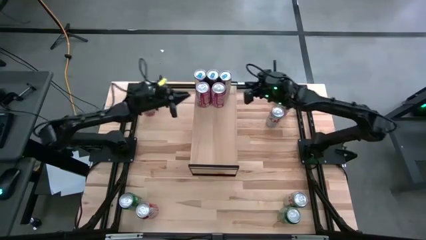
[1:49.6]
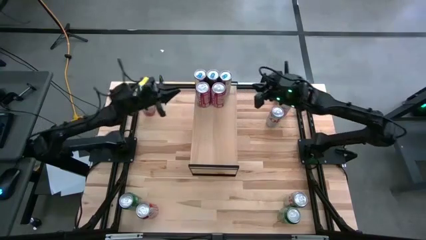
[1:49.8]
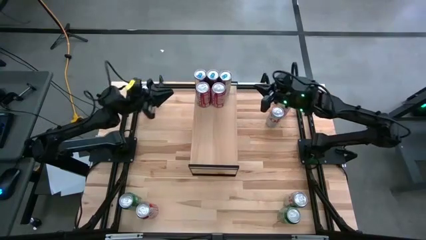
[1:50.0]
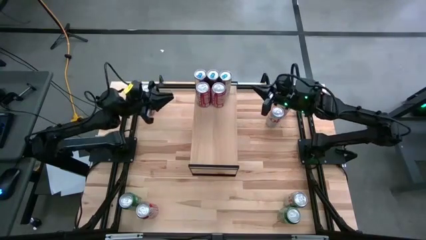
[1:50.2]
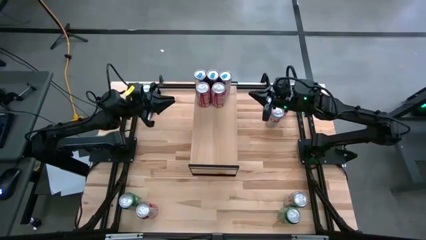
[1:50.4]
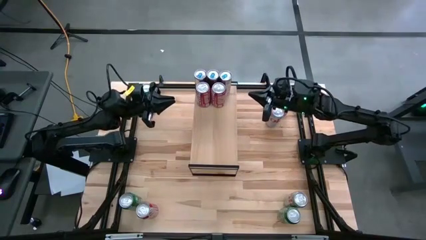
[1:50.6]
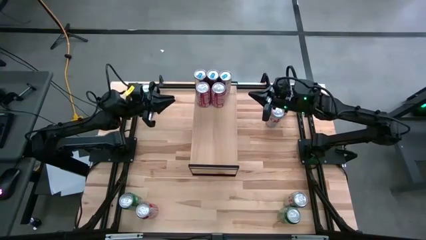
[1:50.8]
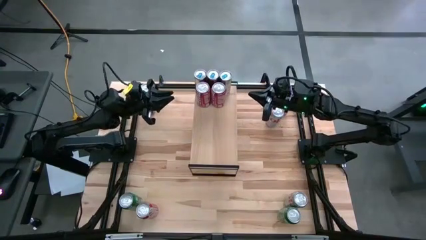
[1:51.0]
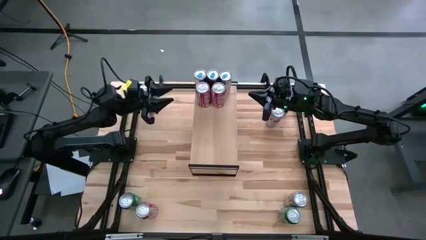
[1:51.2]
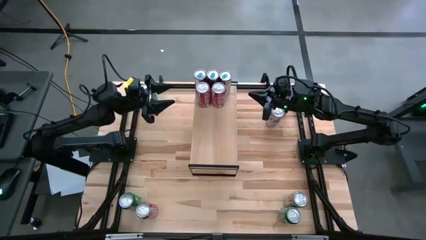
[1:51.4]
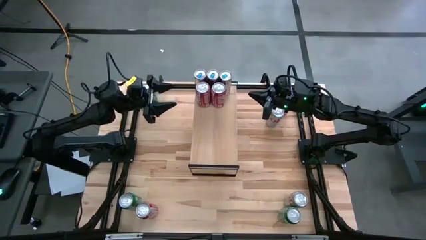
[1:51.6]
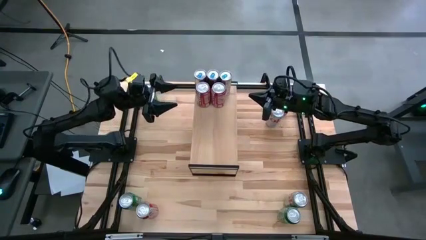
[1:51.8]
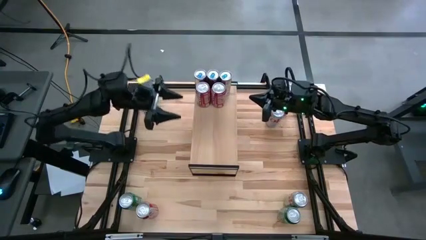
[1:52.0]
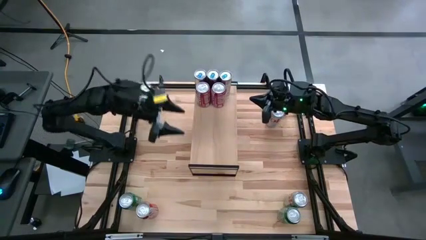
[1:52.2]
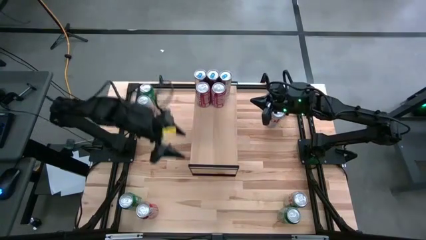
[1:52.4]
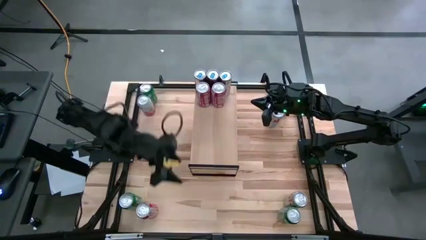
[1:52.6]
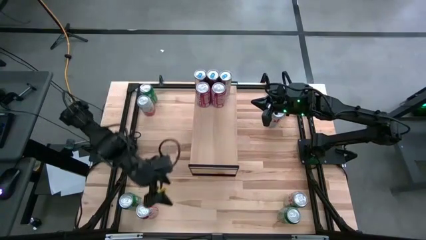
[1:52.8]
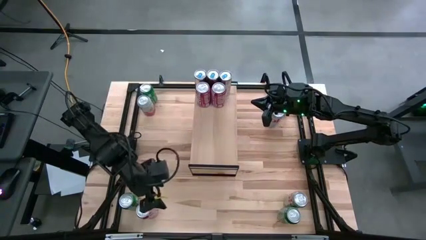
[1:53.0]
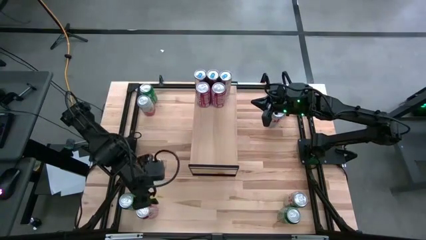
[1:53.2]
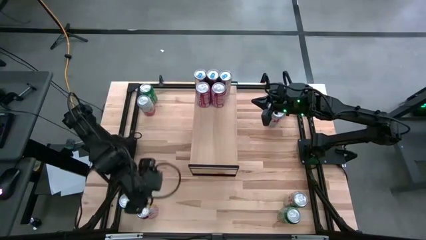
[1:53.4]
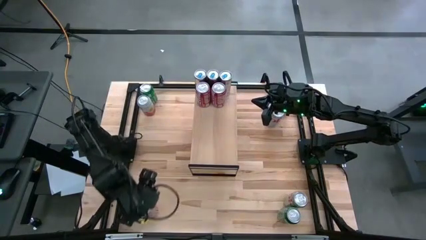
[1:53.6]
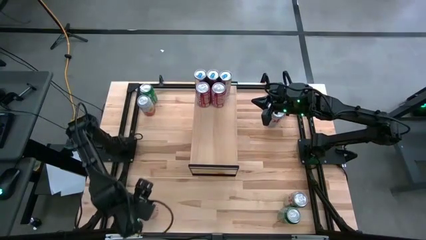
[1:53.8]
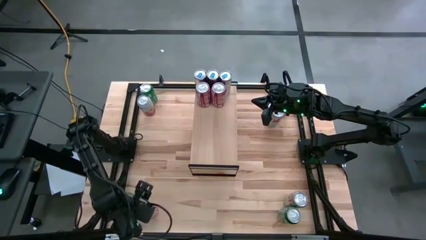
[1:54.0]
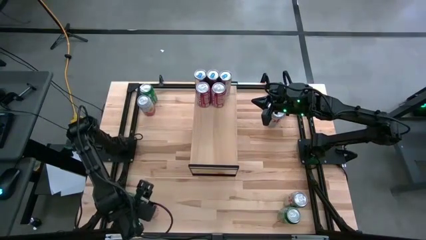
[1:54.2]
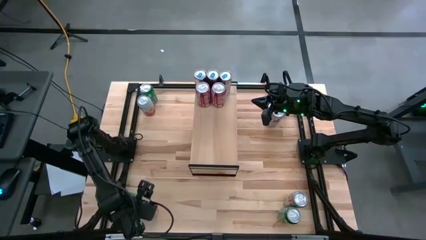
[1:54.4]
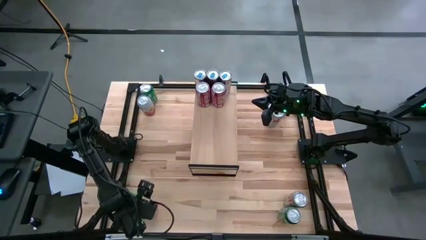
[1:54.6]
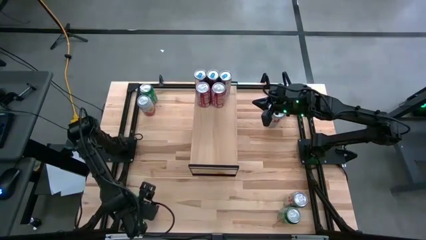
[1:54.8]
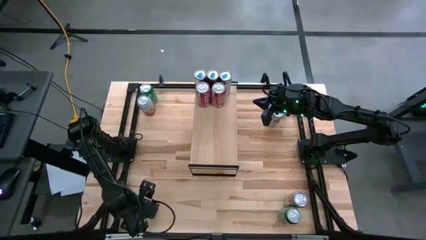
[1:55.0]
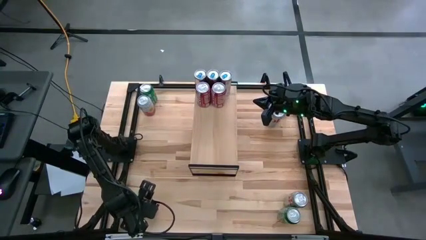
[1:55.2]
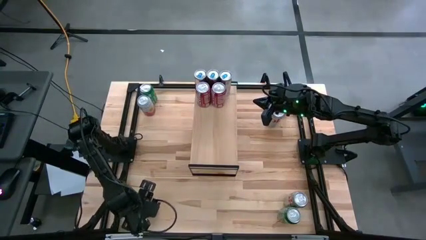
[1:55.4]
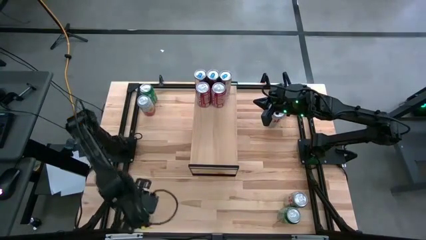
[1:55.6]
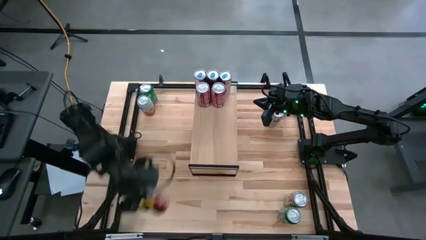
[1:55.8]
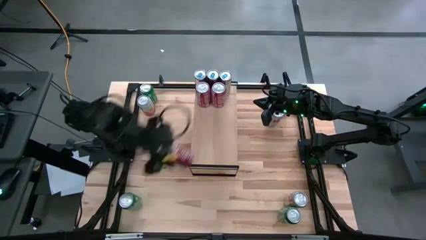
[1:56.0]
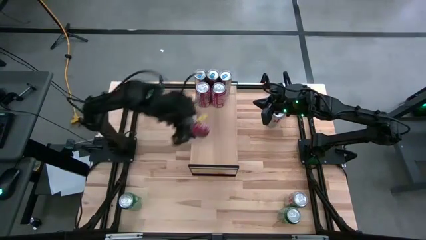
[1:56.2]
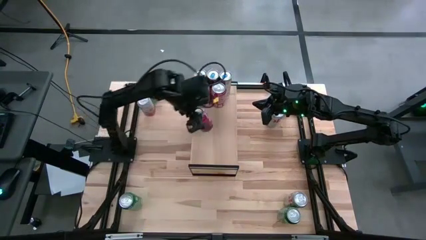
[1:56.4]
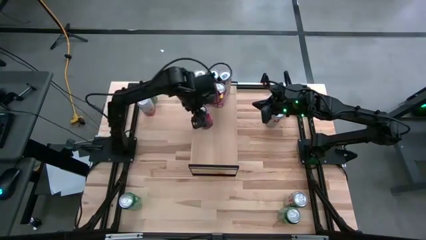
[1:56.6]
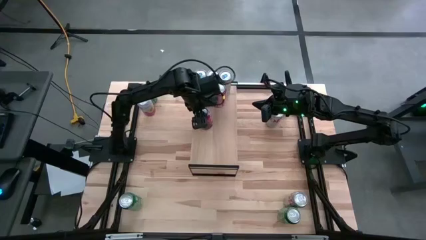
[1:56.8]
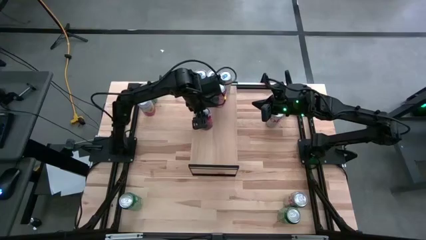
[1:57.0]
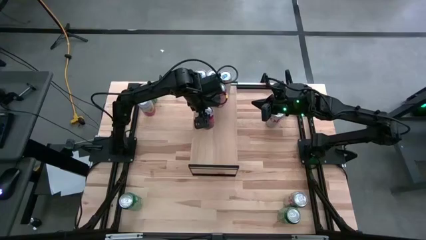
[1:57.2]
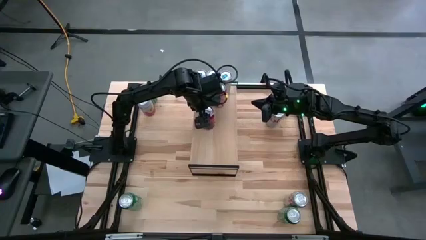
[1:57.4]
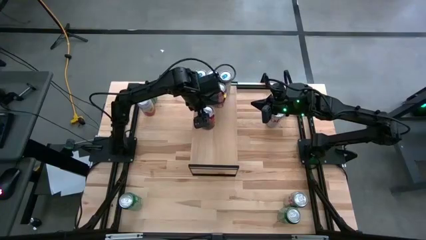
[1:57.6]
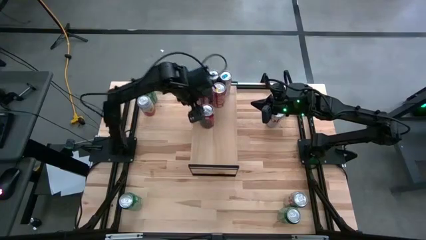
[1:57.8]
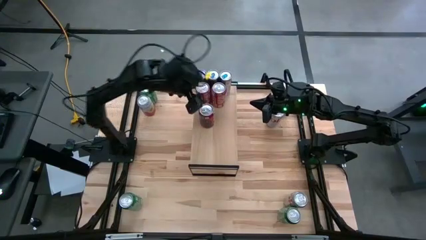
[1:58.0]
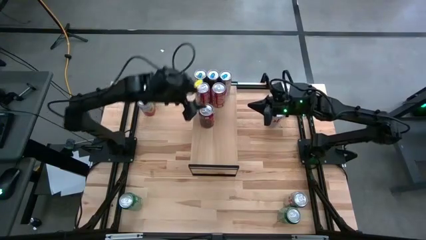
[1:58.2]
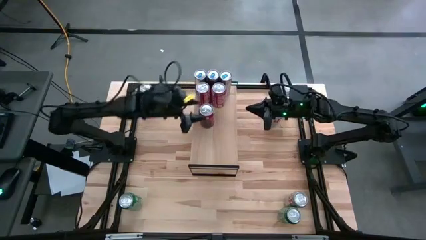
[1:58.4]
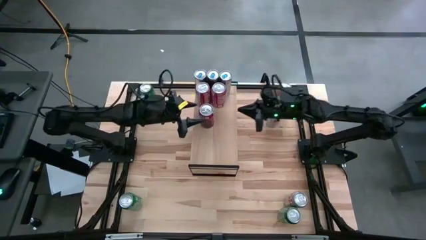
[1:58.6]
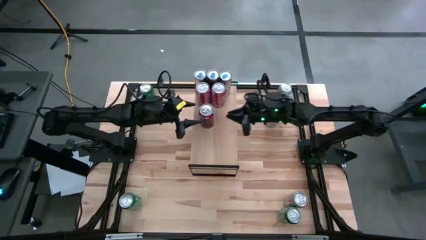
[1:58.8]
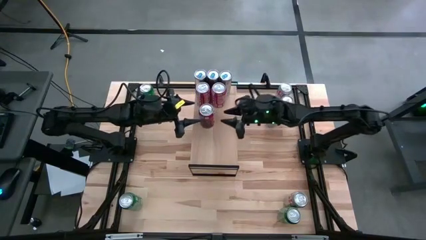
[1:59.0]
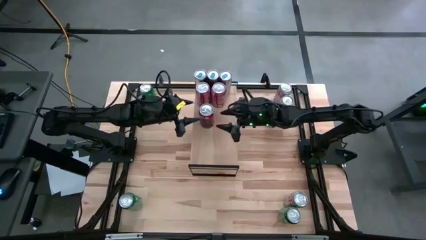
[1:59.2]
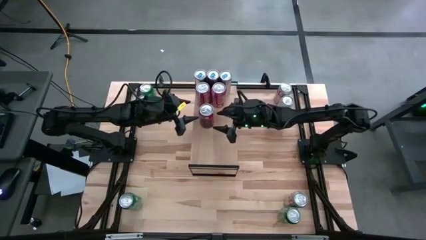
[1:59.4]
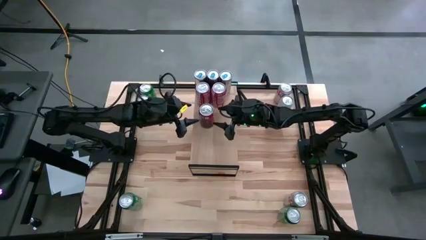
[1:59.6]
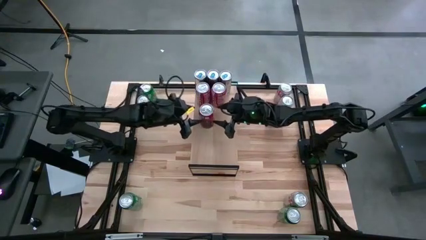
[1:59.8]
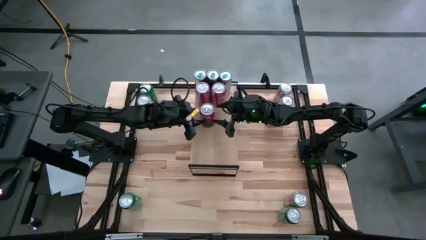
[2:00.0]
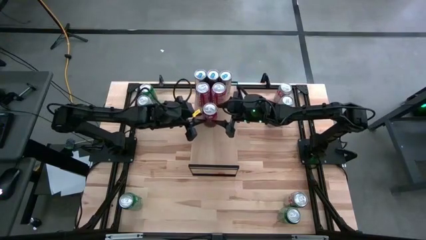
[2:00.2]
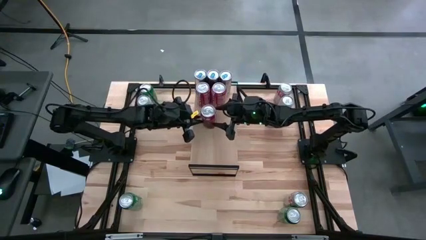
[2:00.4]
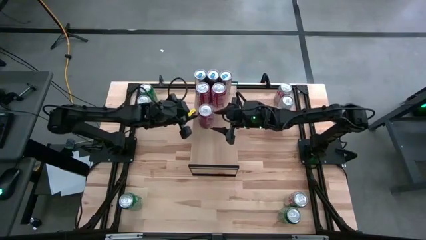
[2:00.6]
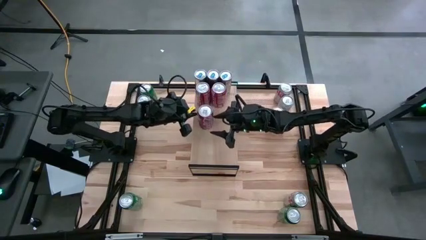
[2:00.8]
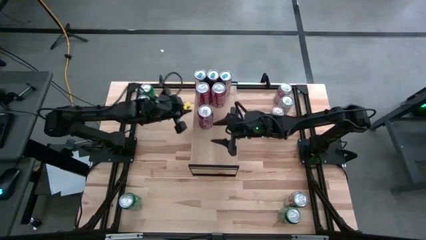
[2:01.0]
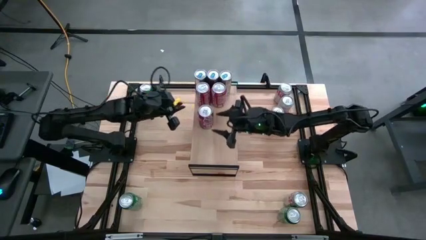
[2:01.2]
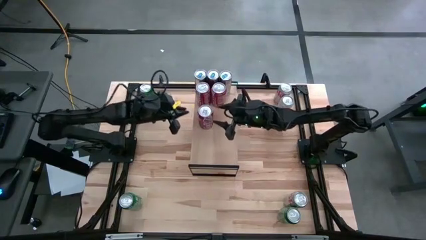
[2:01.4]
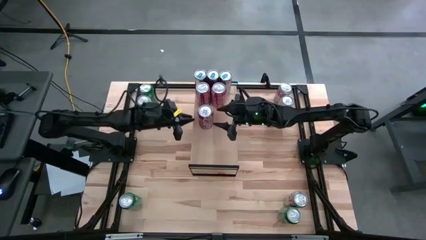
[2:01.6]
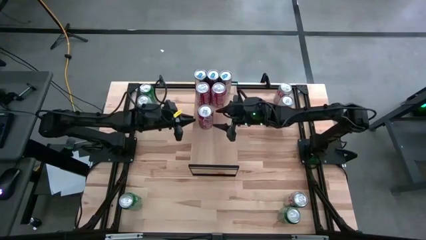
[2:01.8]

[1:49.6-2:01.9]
Task: Place canned beverage on shelf
Put the red white soda can on the shelf
